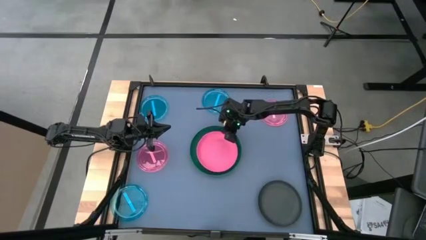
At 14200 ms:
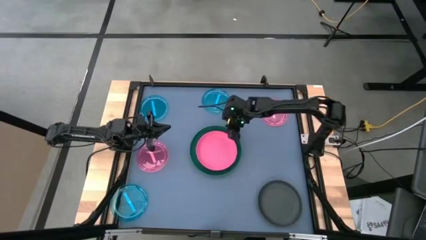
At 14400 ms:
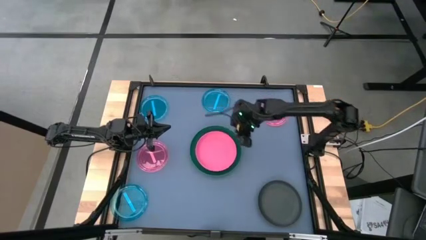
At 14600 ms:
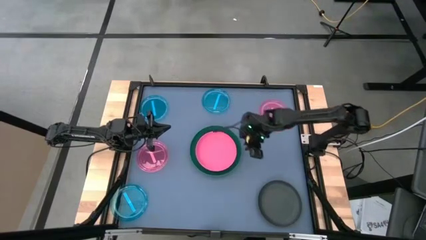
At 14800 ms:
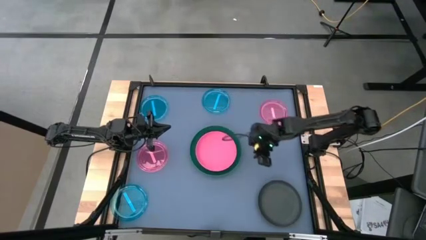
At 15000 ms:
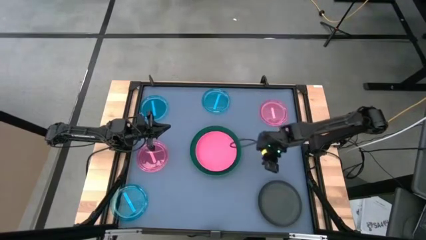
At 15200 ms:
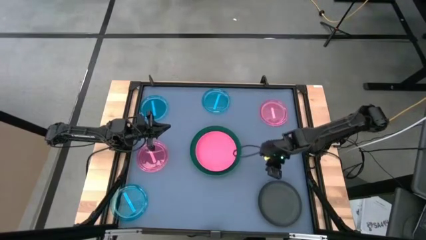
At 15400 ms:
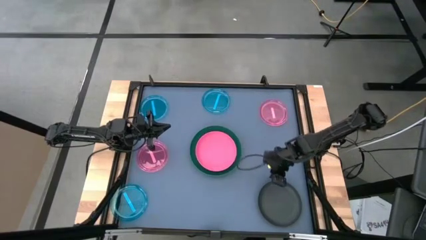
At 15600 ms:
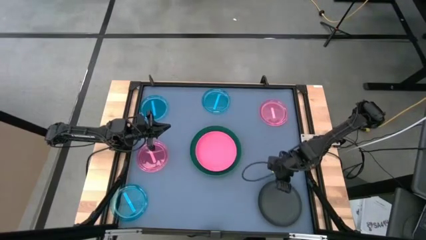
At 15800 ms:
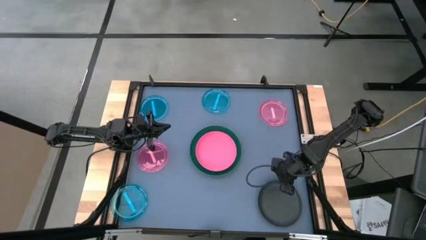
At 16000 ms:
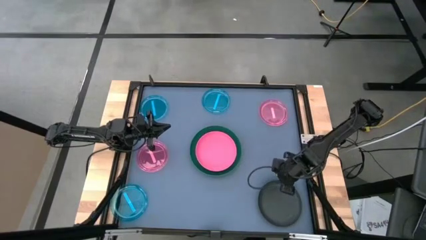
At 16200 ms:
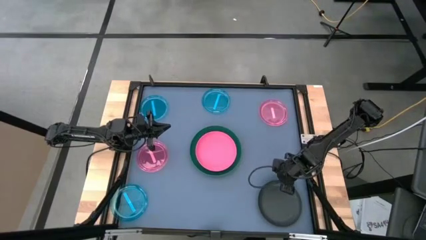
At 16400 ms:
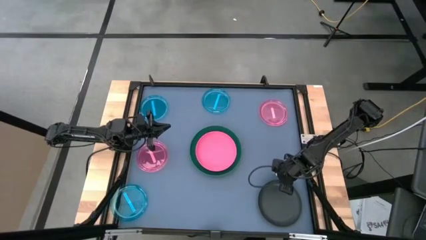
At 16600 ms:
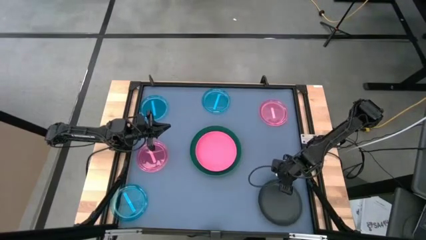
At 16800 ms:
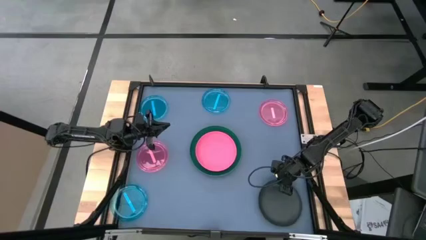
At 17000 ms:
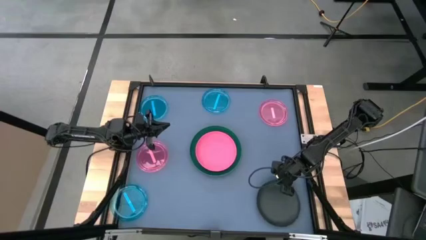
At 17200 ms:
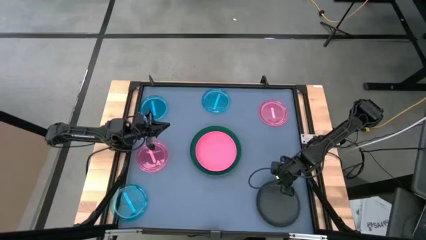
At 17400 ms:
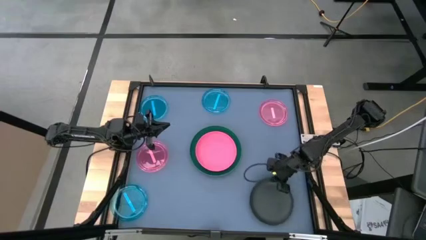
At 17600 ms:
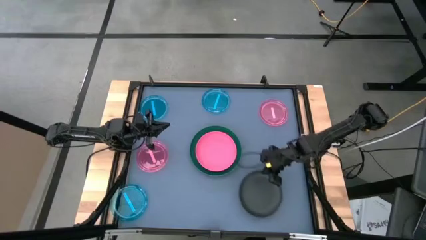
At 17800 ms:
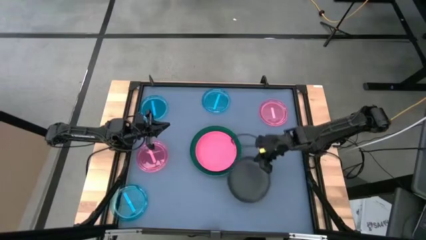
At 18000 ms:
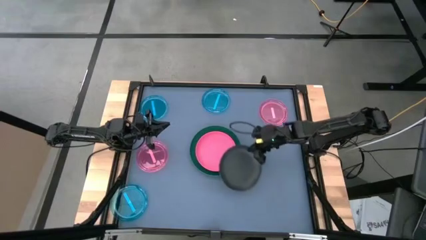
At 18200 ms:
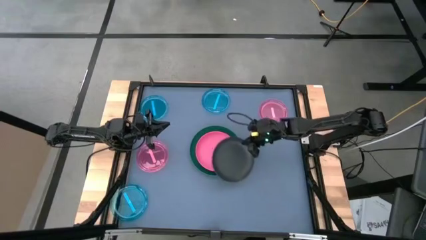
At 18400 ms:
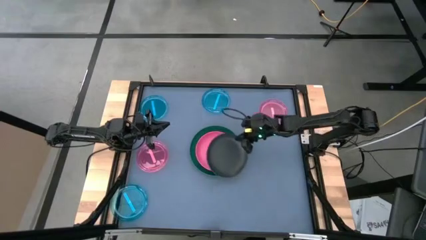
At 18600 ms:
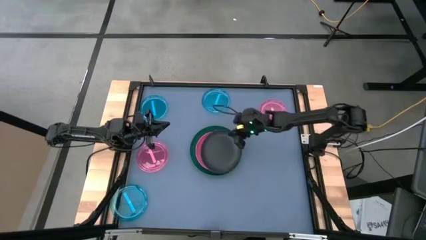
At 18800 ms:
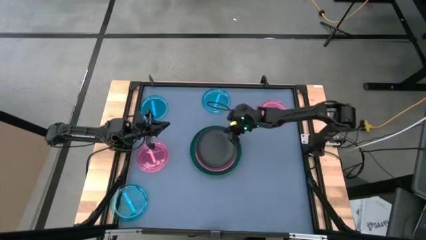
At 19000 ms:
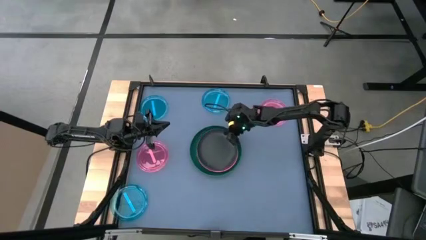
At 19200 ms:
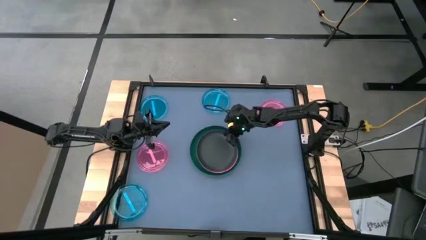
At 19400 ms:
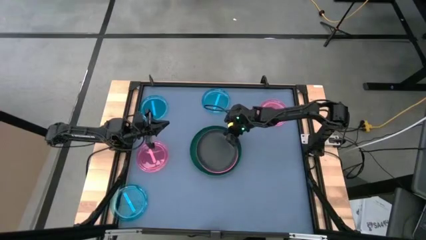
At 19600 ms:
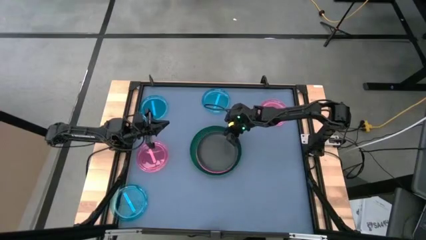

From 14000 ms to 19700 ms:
Task: Stack plastic plates
Stack the black plate on top of the pink plate

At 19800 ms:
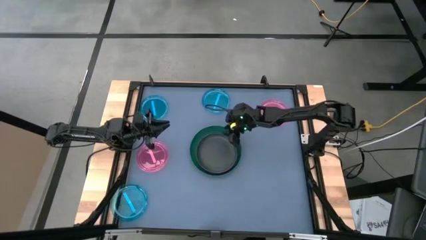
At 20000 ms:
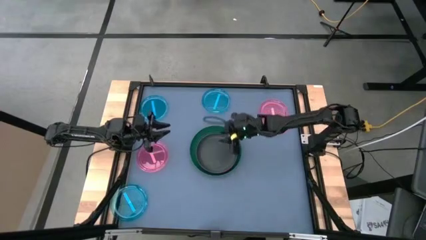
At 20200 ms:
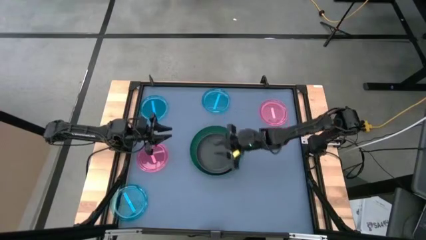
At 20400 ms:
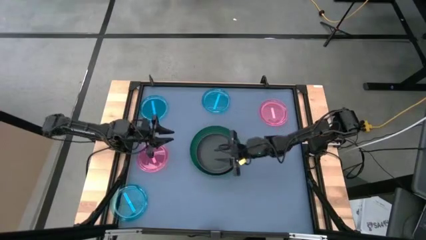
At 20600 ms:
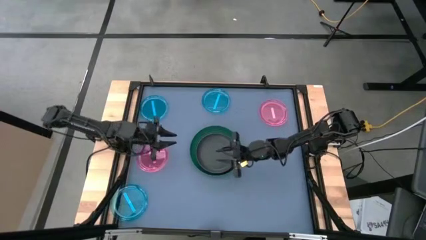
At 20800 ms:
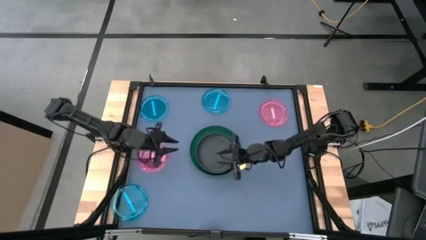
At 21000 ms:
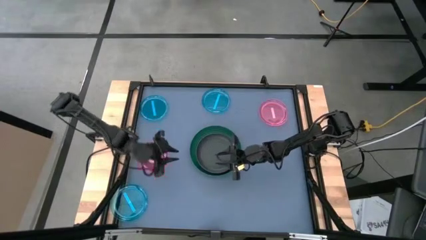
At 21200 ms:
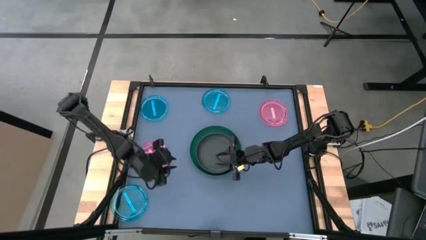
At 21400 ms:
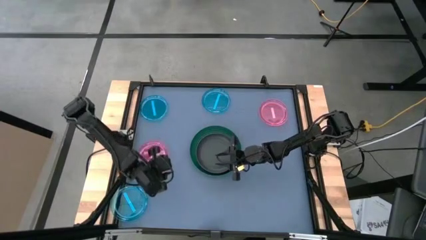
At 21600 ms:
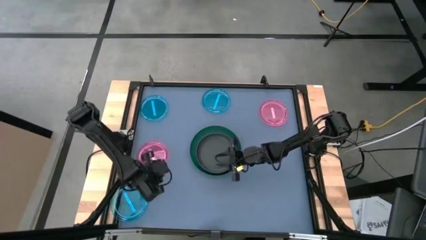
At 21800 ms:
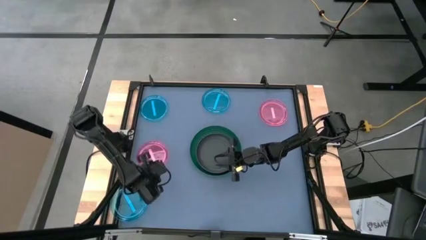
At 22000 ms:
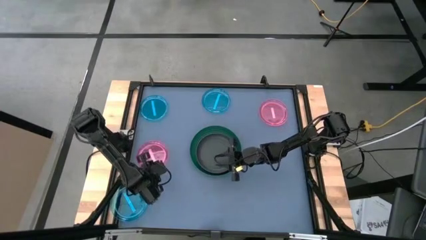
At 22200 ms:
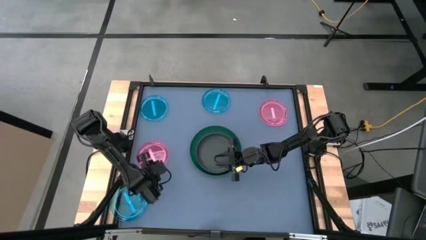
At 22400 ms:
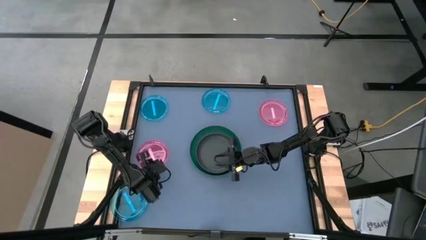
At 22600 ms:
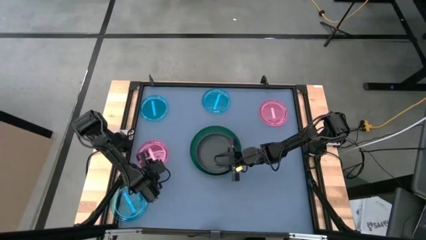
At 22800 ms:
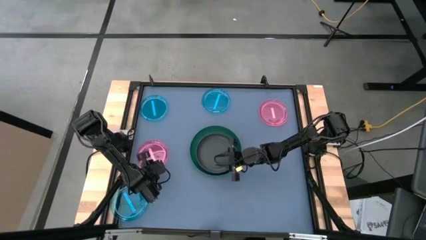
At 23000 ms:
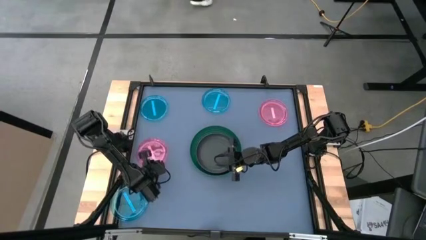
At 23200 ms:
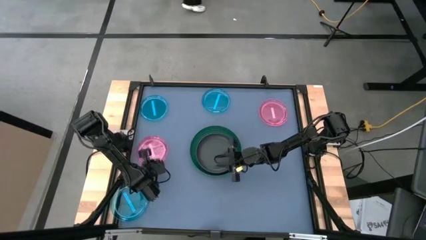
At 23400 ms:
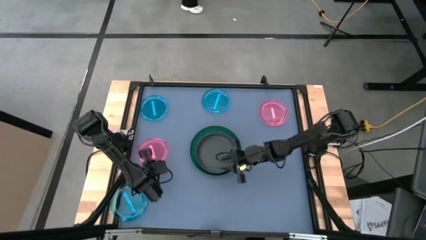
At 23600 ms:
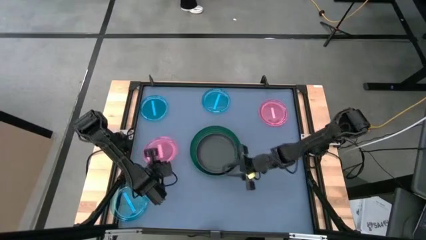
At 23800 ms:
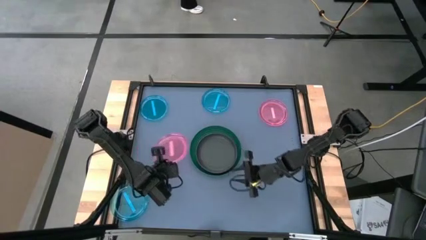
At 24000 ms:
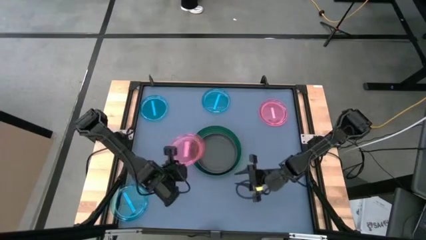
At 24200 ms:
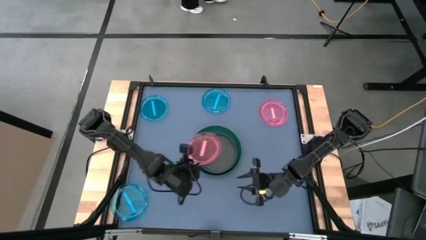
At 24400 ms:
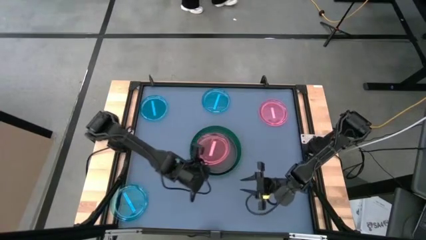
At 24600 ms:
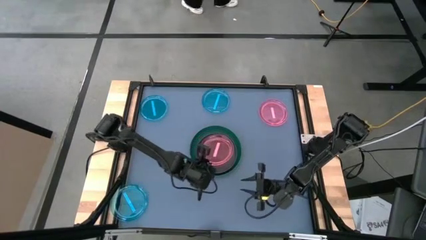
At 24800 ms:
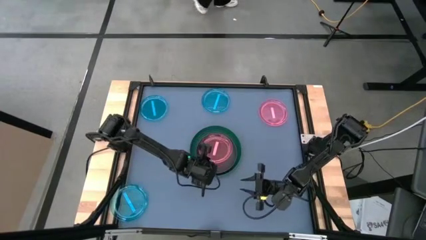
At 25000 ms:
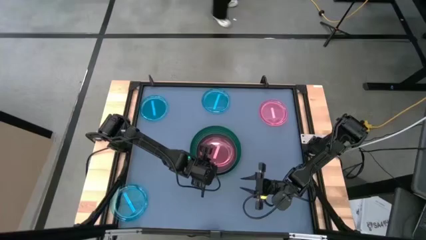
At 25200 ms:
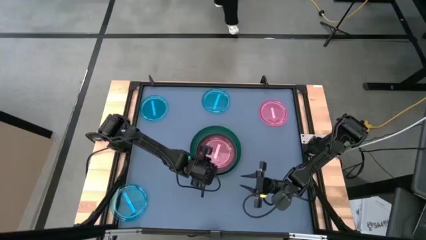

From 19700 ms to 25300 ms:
Stack the left light pink plate on top of the black plate

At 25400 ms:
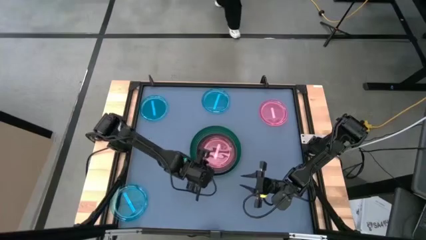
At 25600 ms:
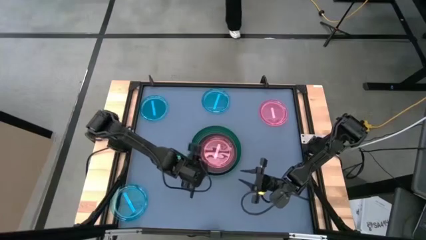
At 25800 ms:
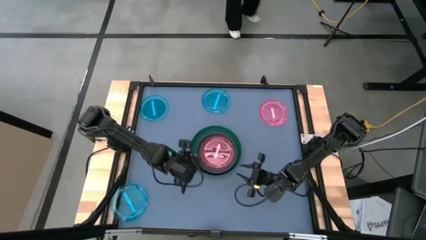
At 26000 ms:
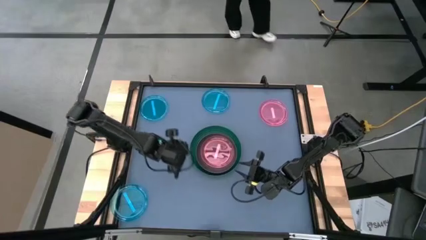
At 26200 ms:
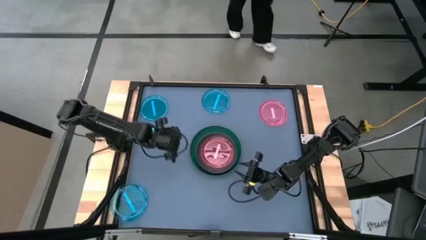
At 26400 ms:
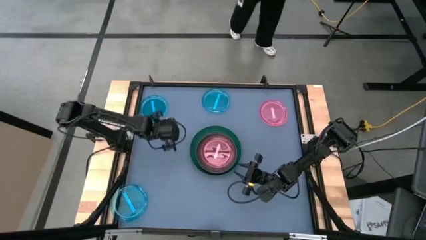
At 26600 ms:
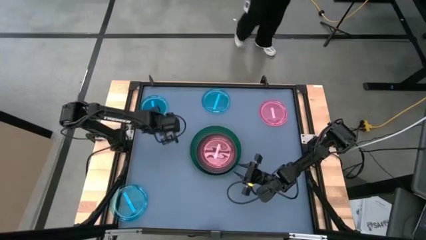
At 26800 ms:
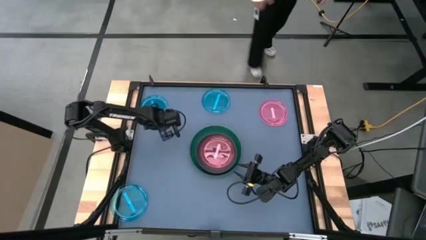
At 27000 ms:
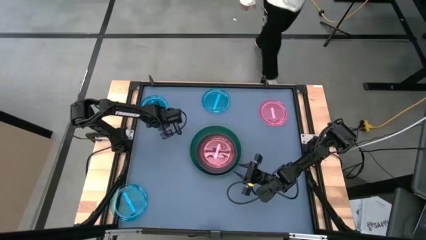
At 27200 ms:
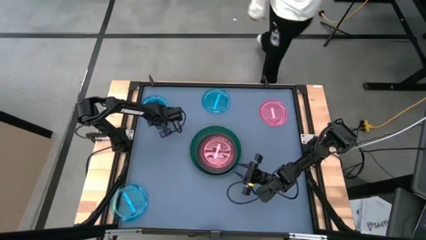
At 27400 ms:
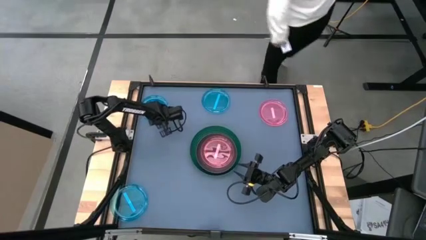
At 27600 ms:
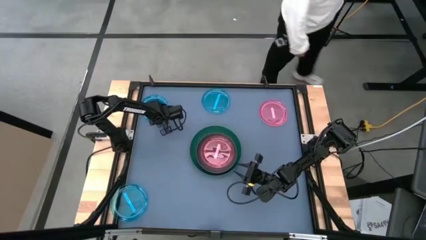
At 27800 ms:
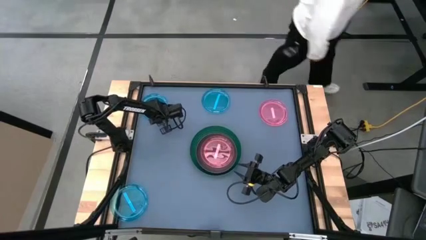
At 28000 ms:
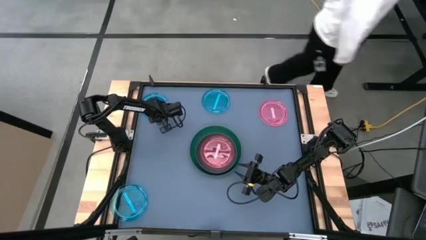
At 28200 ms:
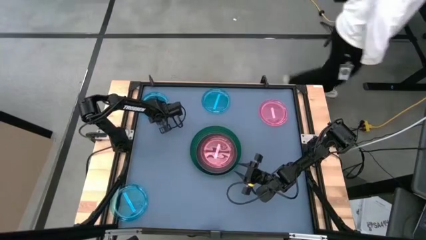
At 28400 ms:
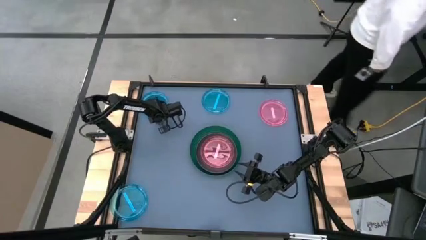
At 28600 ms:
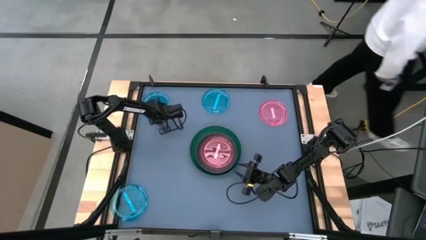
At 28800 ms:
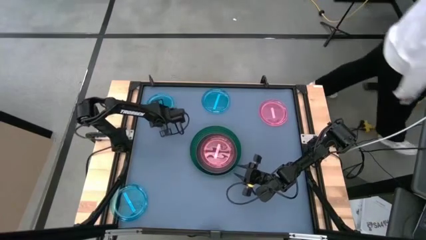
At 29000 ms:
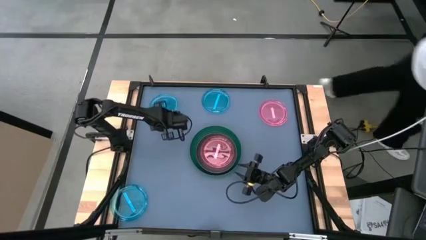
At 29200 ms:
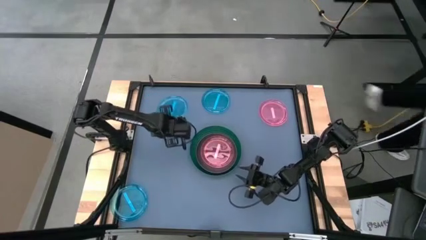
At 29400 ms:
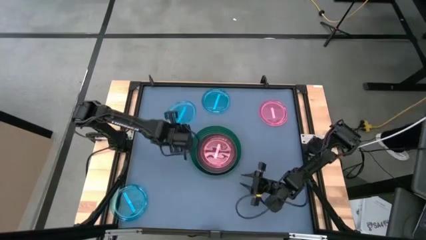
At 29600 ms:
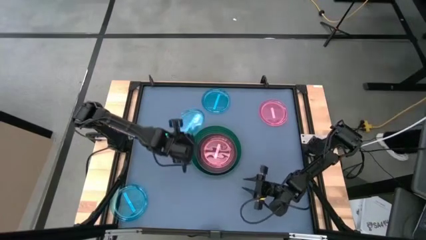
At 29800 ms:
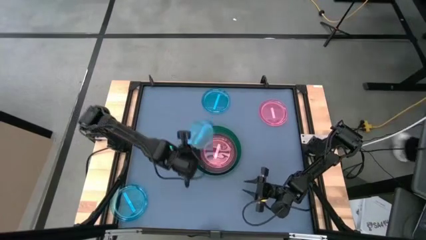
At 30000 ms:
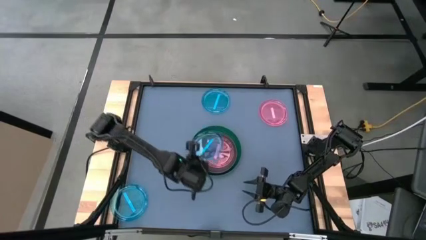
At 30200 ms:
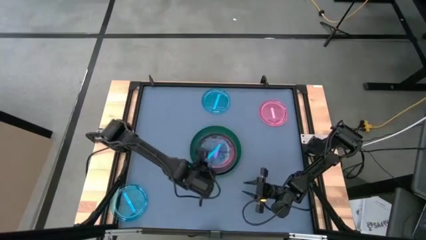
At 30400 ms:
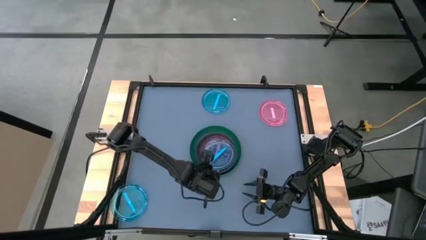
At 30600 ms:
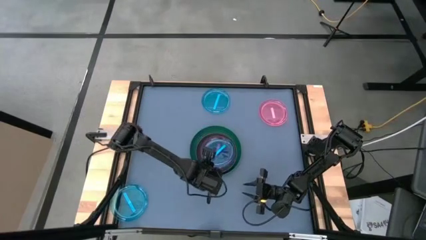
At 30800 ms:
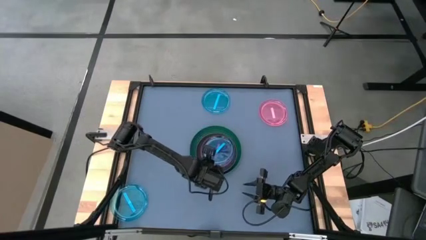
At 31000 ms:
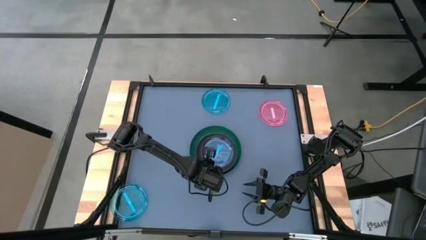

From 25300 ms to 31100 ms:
Stack the top left light blue plate on top of the light pink plate
